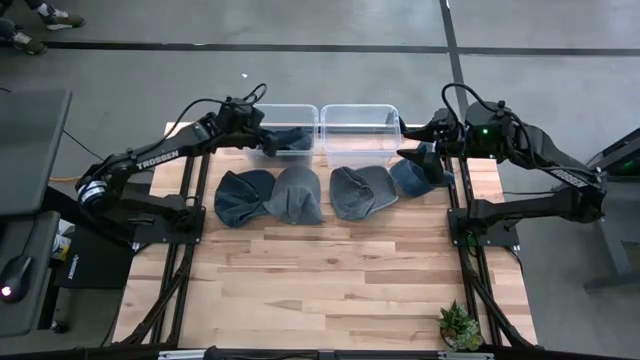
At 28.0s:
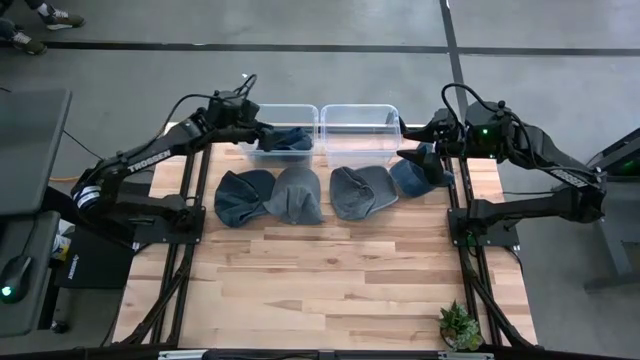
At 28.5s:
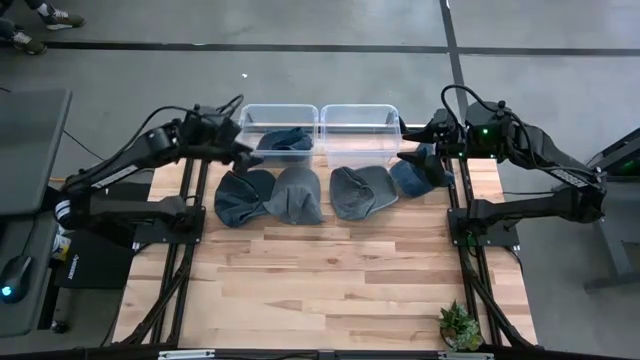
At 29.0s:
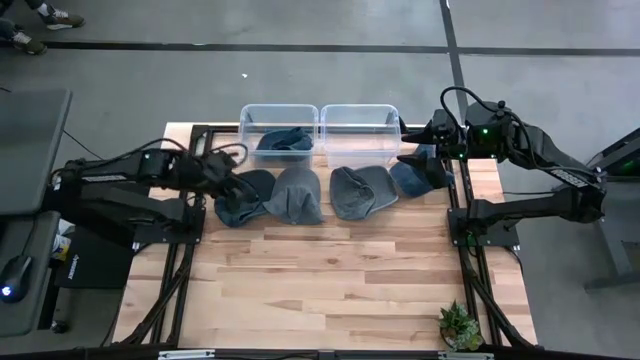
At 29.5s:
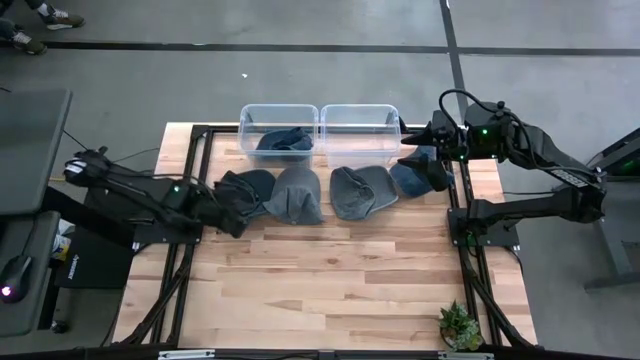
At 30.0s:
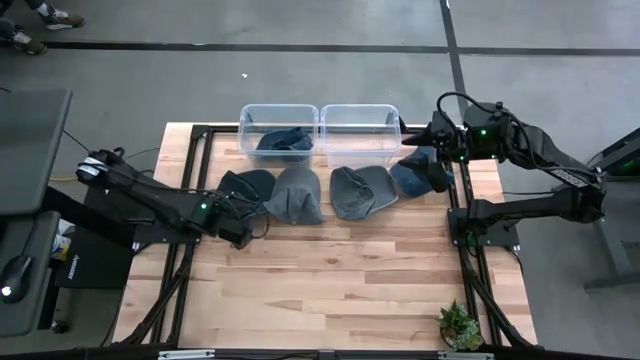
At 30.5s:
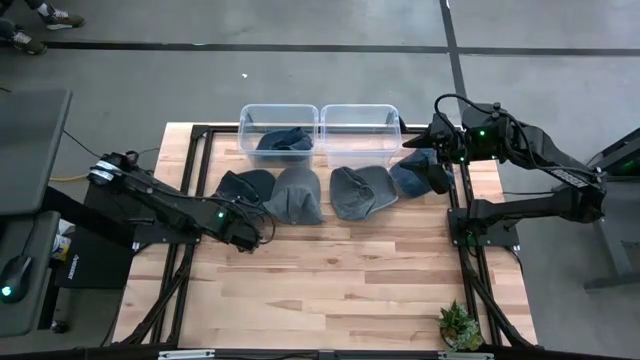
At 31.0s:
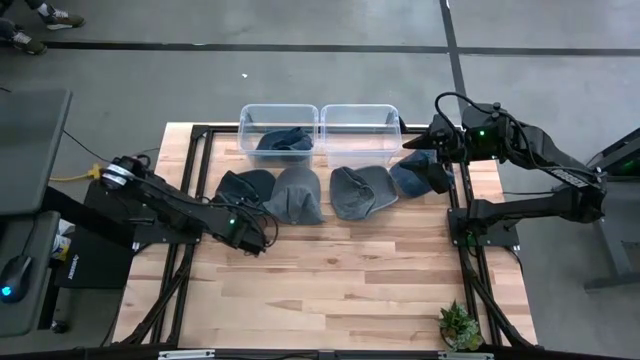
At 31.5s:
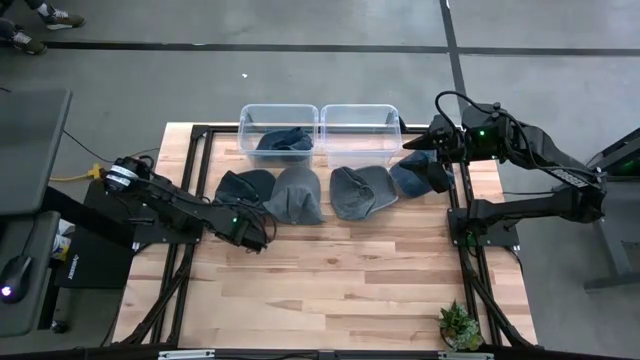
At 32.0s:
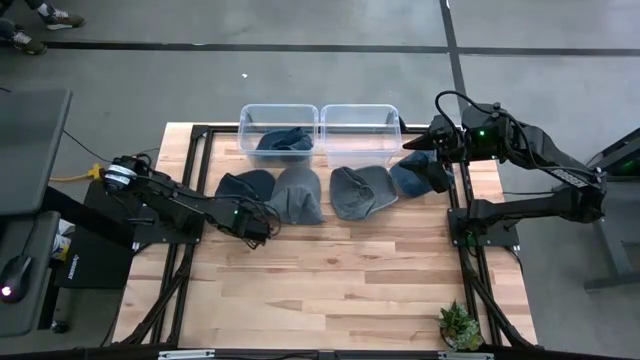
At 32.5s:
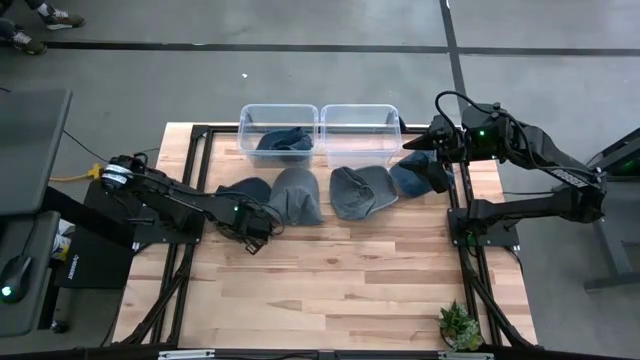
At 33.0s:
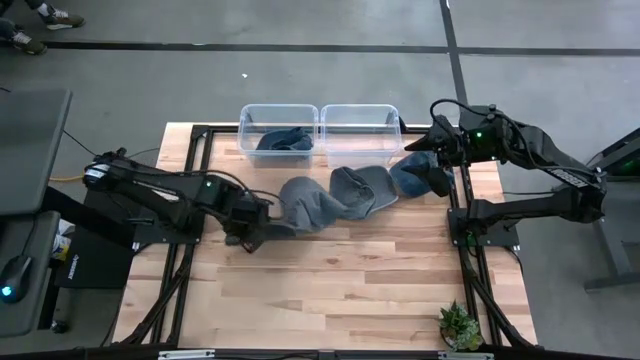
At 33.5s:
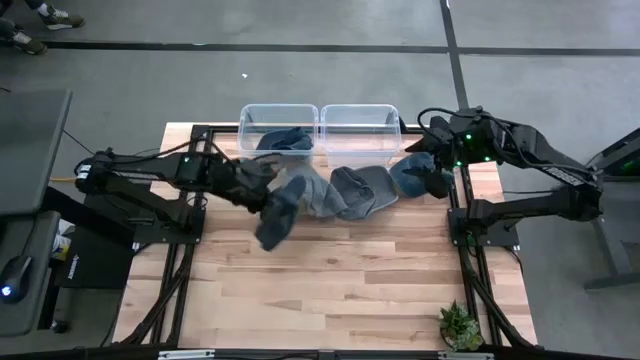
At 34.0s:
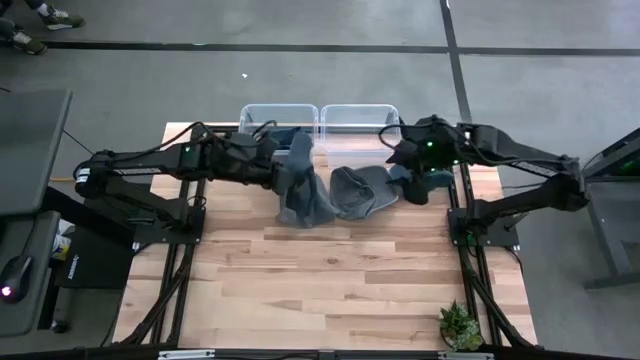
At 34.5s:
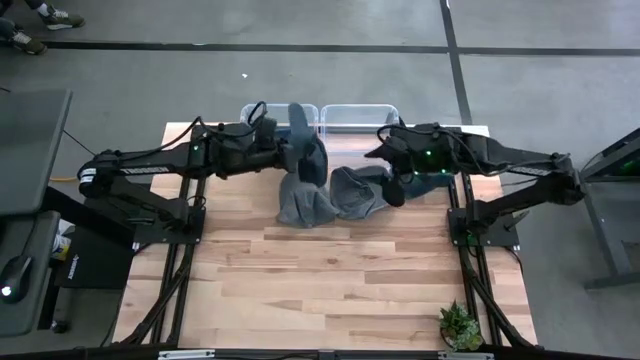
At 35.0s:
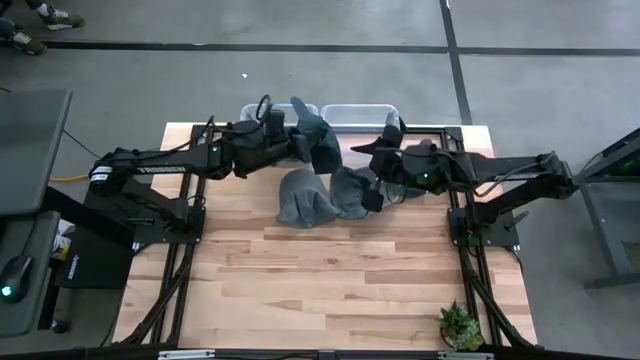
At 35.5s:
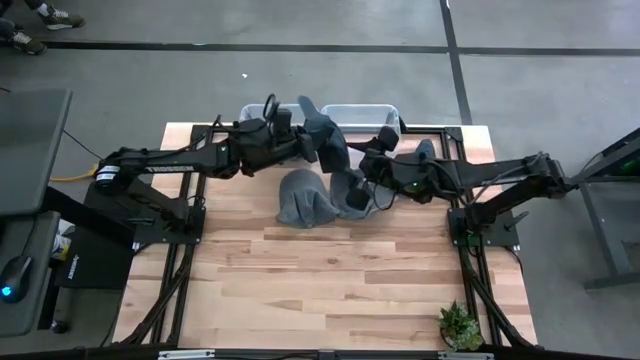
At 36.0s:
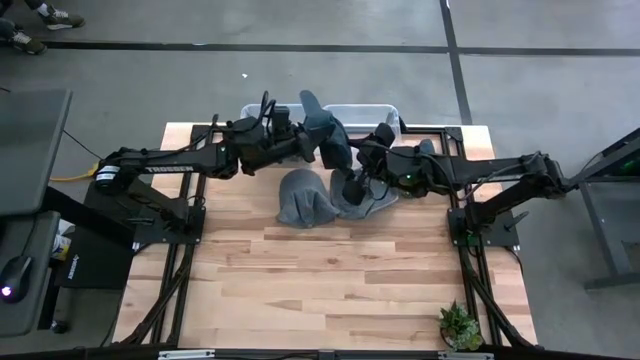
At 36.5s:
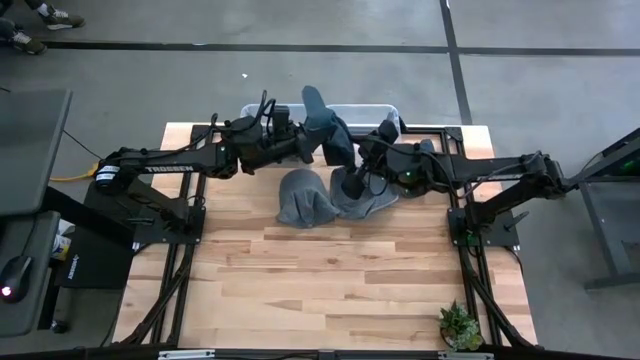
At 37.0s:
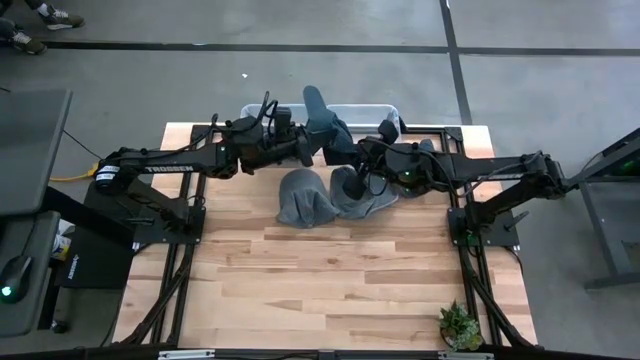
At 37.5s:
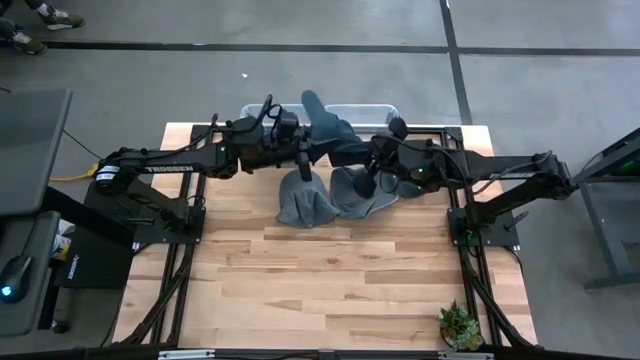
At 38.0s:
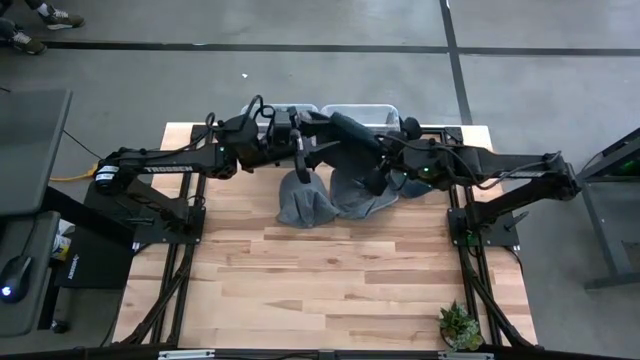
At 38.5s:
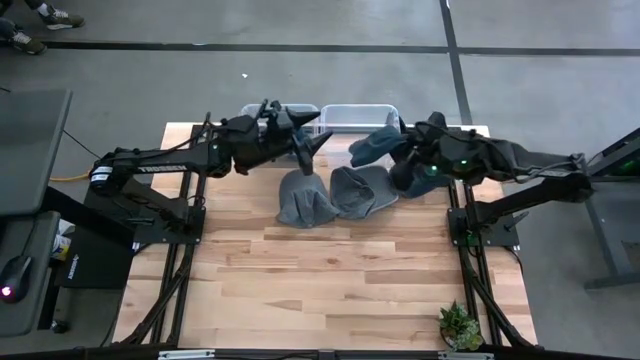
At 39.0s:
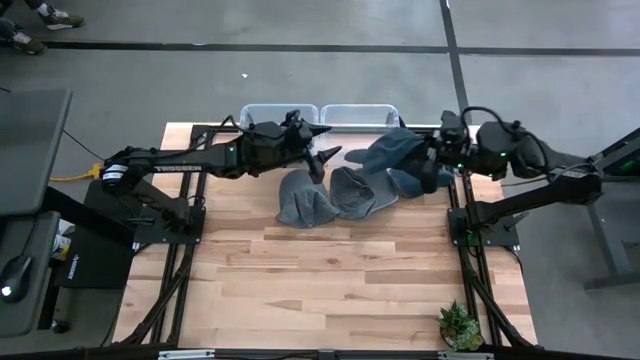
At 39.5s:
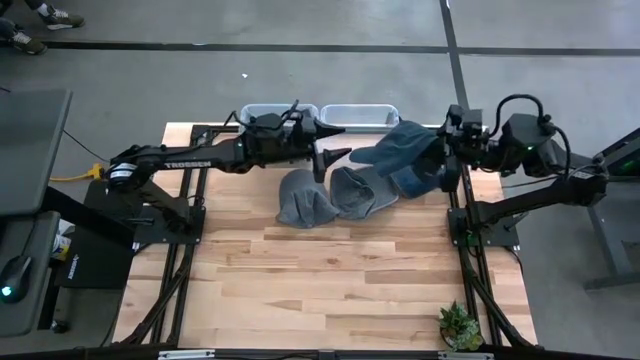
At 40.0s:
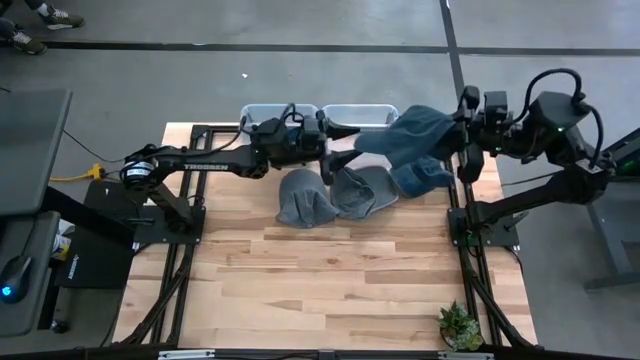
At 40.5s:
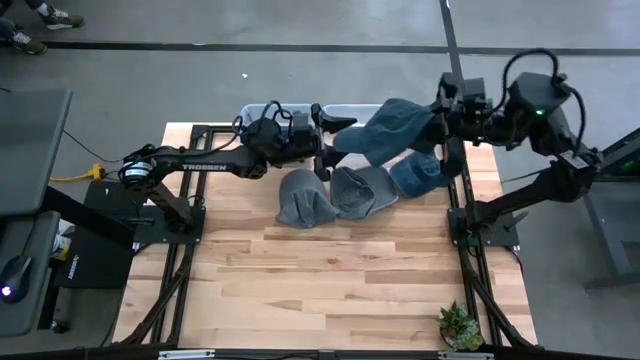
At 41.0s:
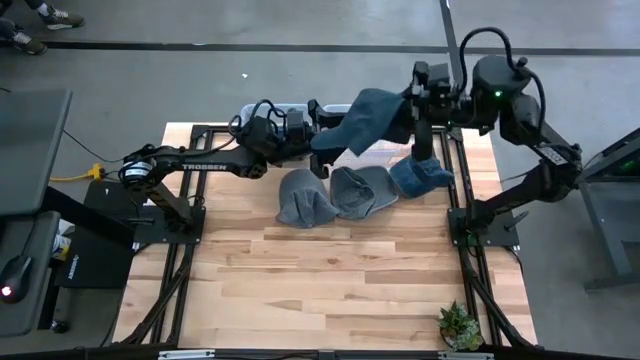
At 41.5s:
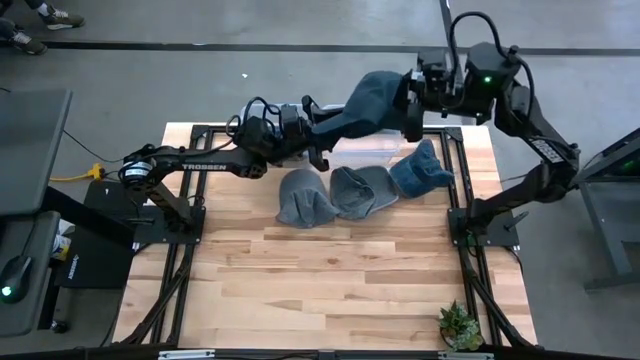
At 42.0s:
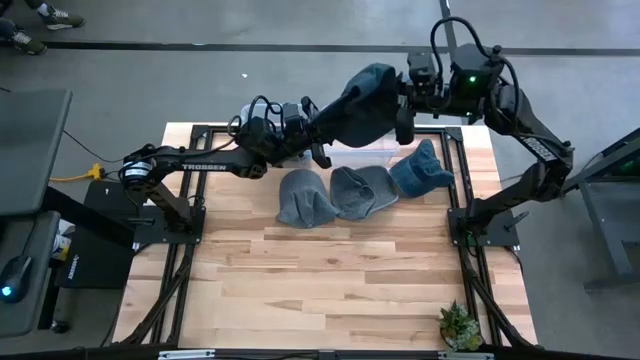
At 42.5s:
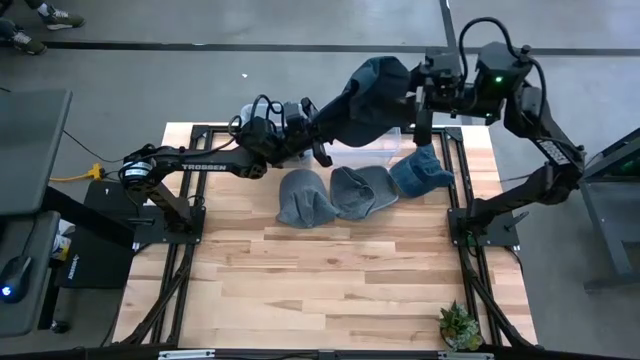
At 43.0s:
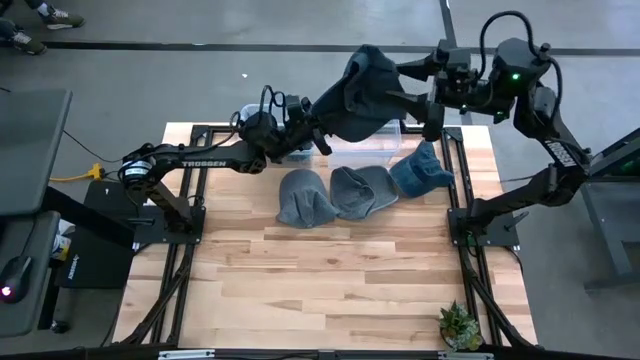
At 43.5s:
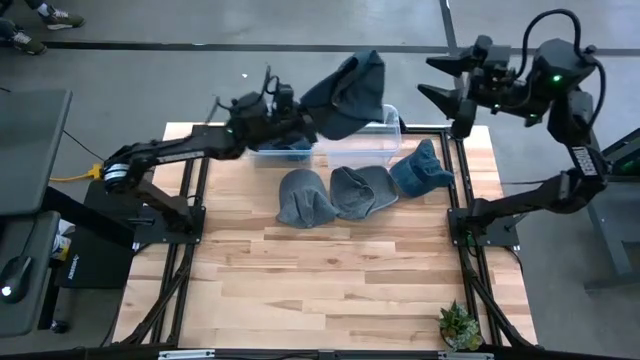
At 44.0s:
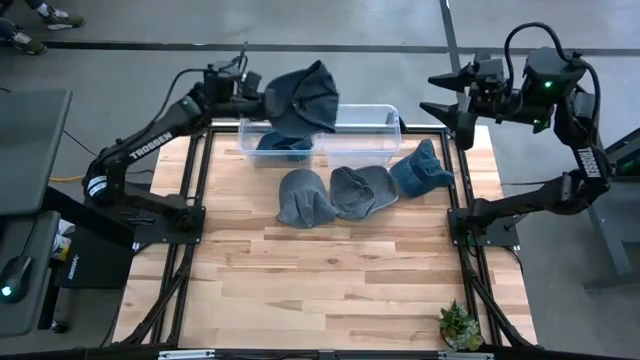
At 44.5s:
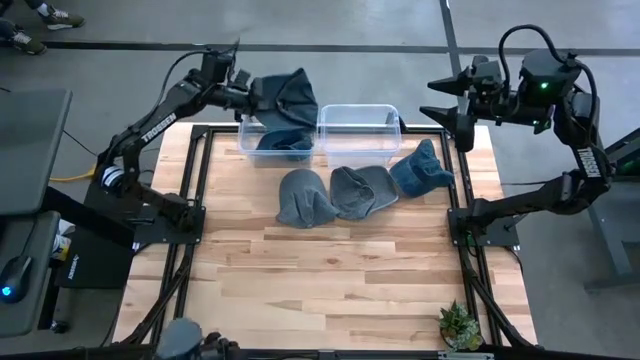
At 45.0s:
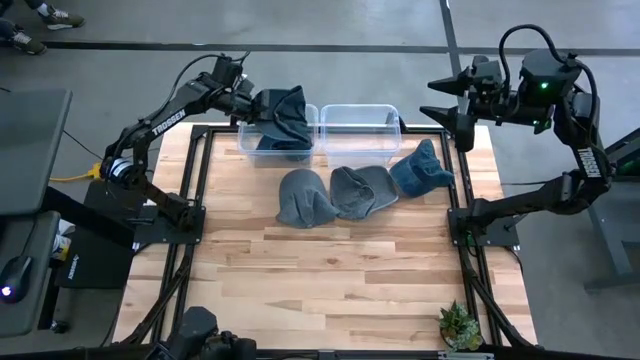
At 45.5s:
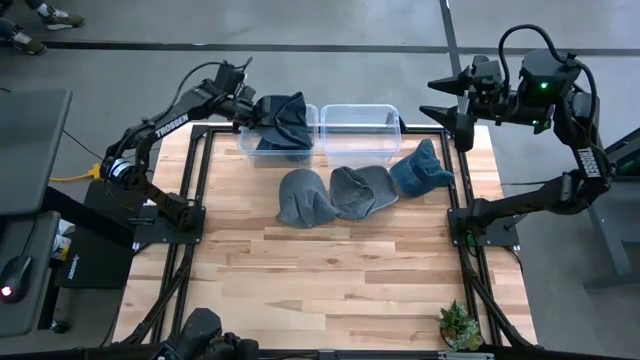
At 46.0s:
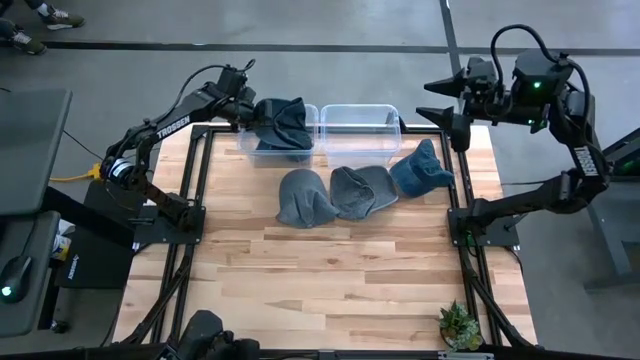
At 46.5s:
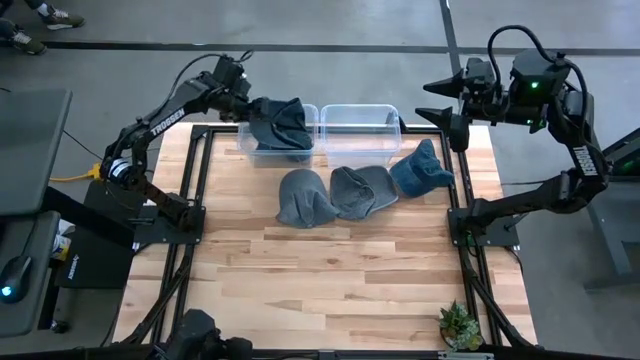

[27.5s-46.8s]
Task: Pick and place caps into container
Put the left blue cap into the left transparent container
